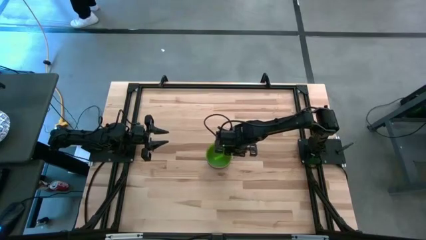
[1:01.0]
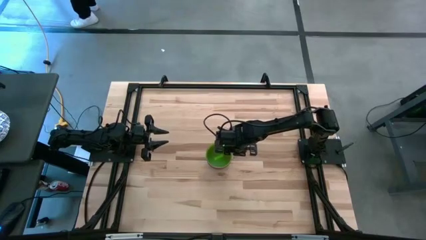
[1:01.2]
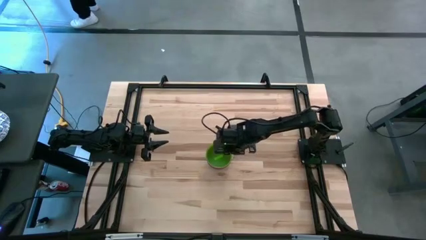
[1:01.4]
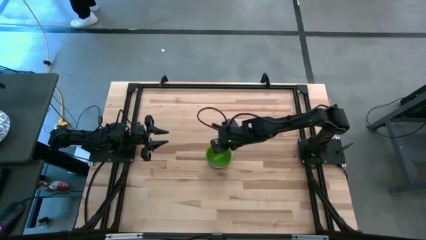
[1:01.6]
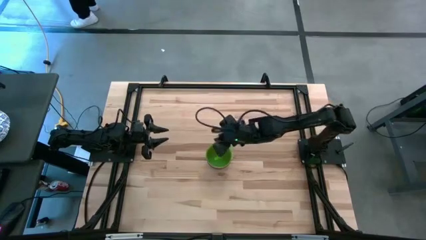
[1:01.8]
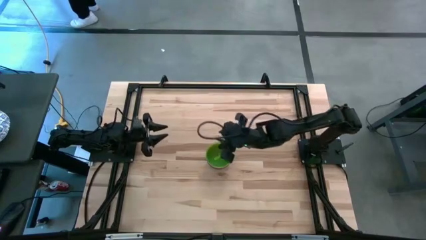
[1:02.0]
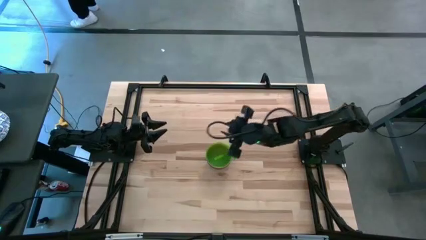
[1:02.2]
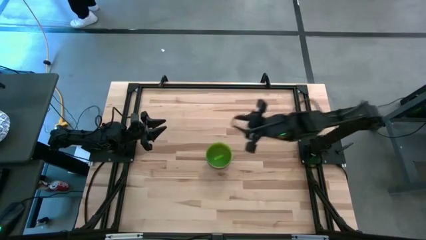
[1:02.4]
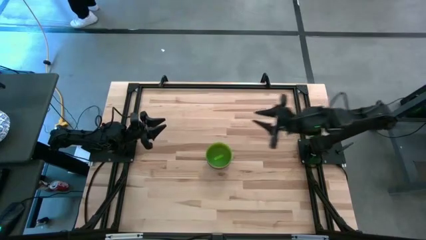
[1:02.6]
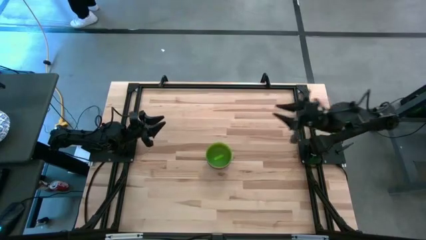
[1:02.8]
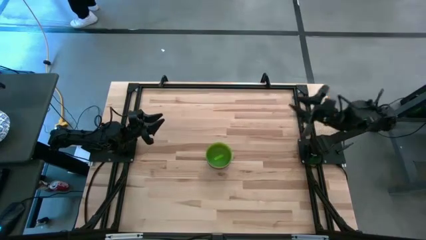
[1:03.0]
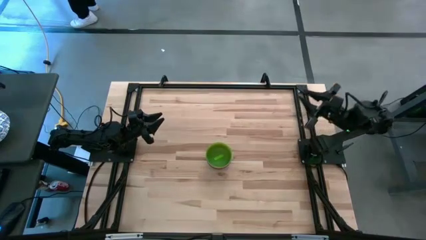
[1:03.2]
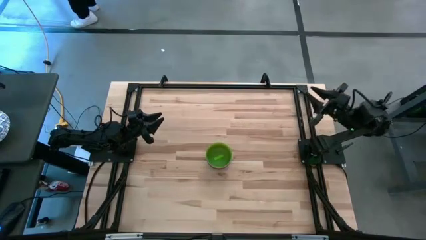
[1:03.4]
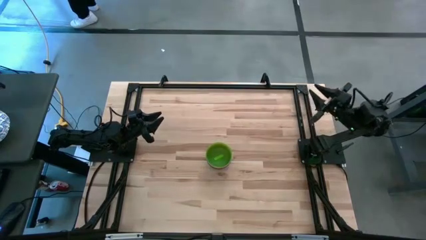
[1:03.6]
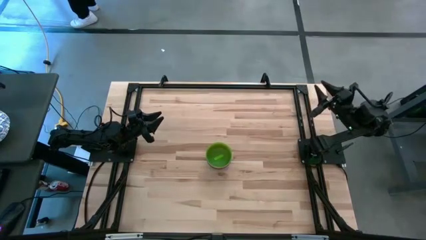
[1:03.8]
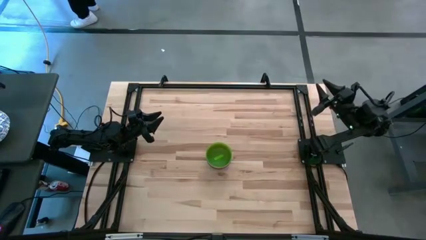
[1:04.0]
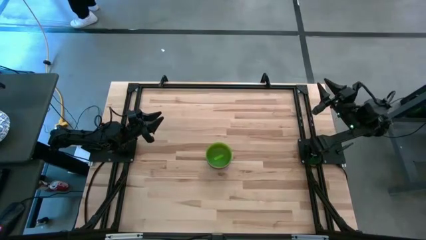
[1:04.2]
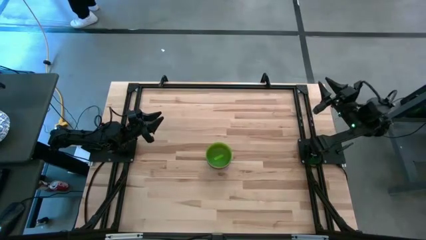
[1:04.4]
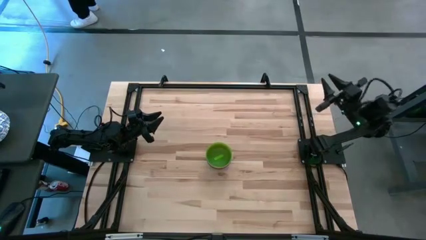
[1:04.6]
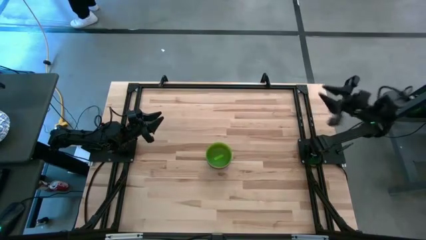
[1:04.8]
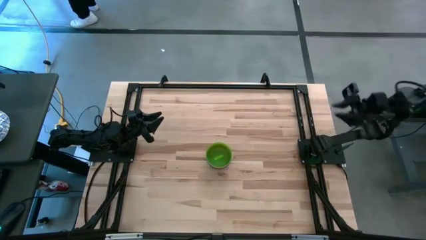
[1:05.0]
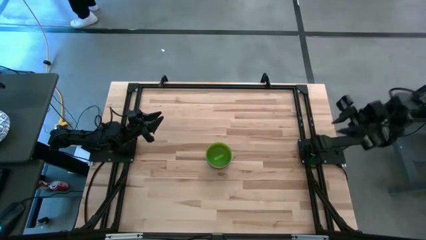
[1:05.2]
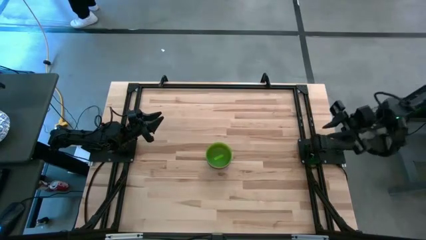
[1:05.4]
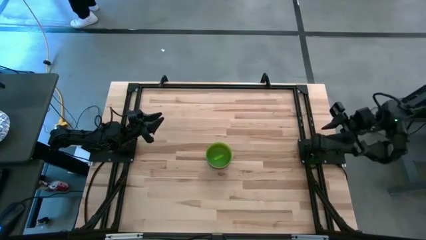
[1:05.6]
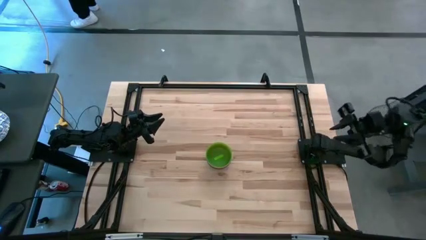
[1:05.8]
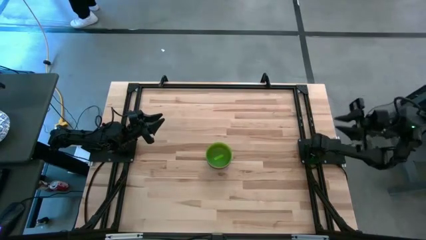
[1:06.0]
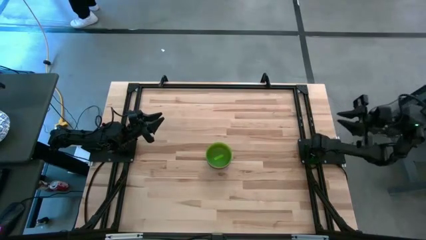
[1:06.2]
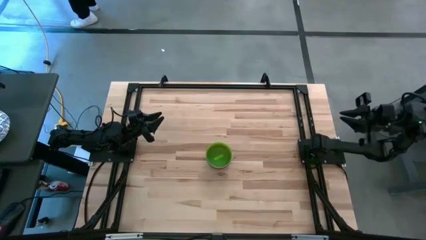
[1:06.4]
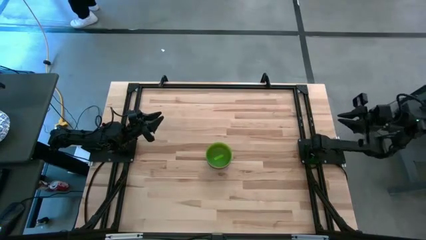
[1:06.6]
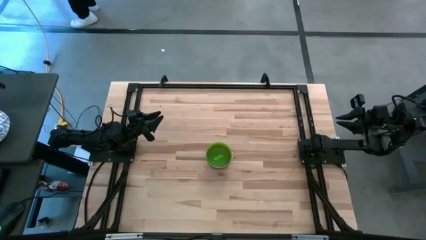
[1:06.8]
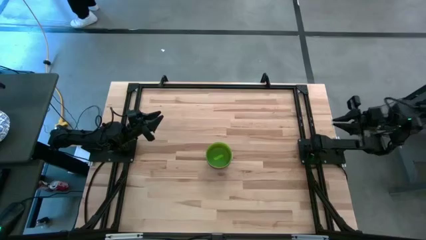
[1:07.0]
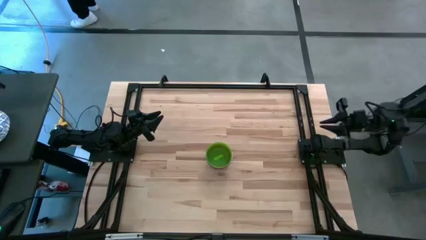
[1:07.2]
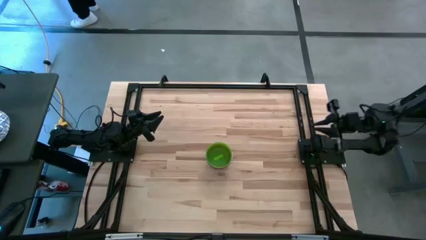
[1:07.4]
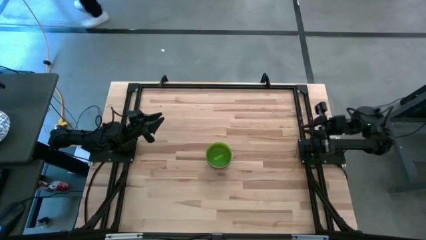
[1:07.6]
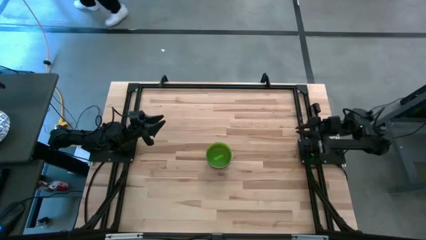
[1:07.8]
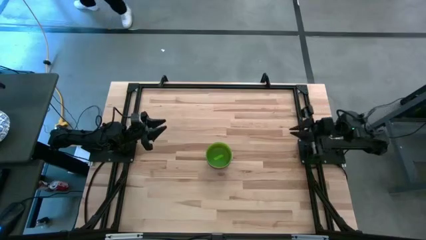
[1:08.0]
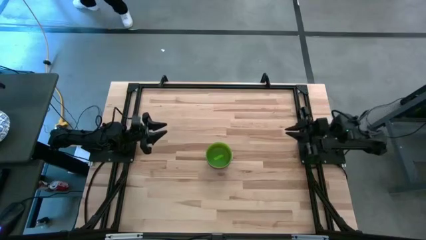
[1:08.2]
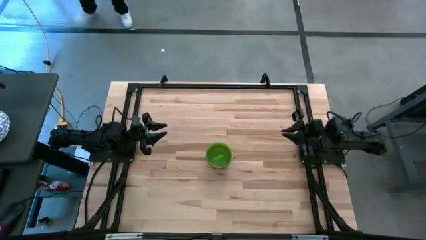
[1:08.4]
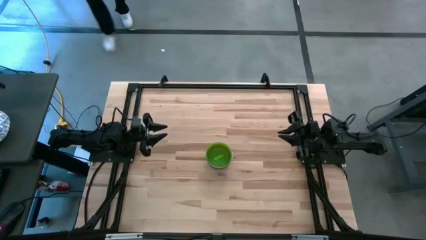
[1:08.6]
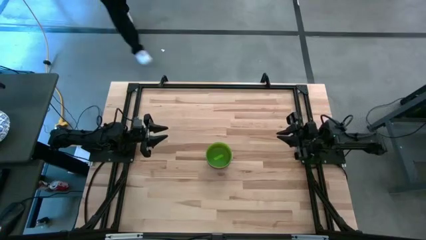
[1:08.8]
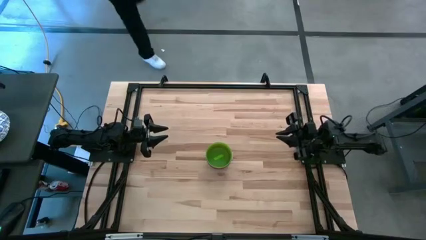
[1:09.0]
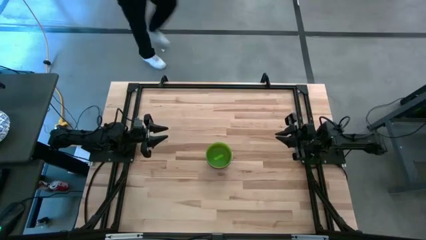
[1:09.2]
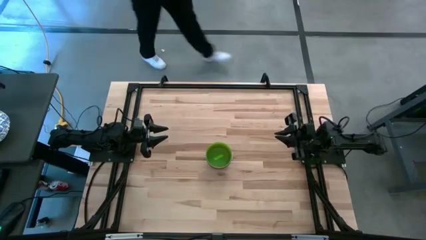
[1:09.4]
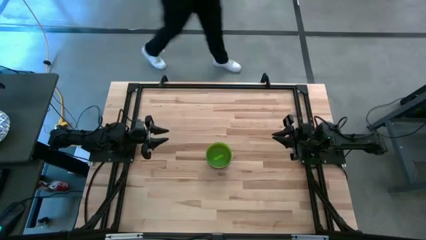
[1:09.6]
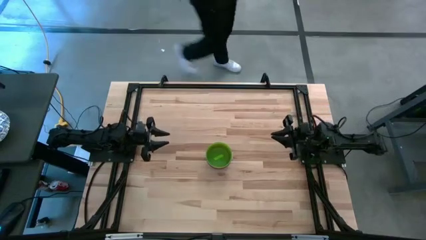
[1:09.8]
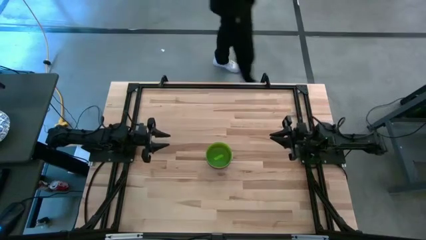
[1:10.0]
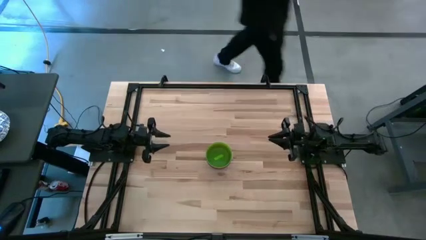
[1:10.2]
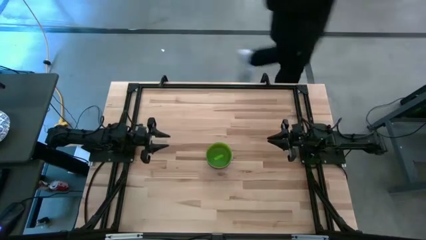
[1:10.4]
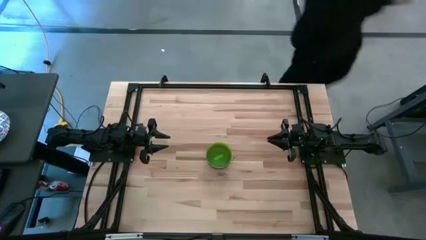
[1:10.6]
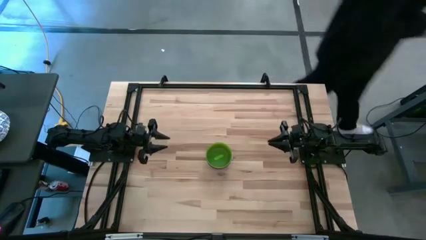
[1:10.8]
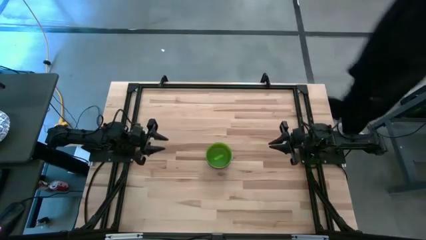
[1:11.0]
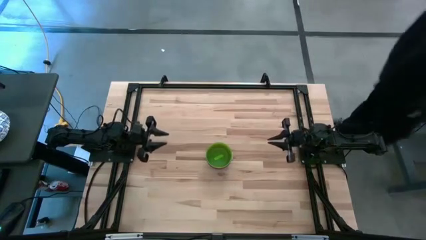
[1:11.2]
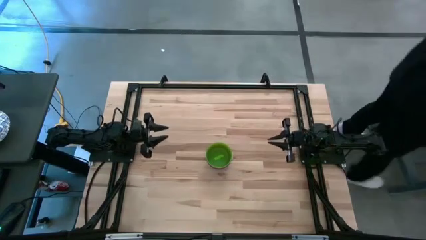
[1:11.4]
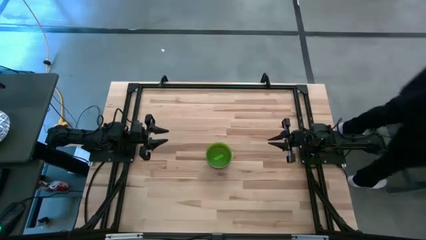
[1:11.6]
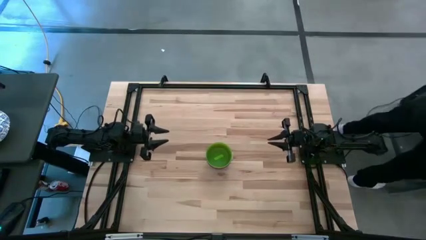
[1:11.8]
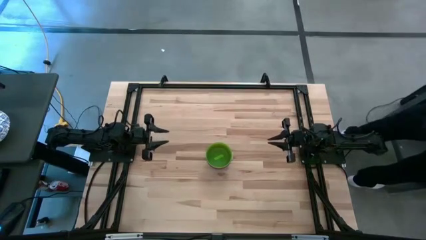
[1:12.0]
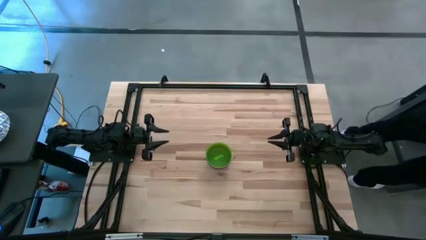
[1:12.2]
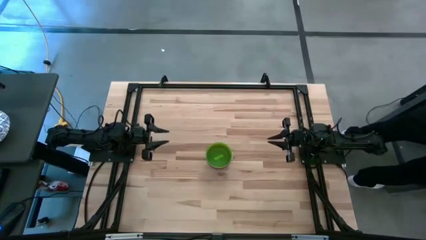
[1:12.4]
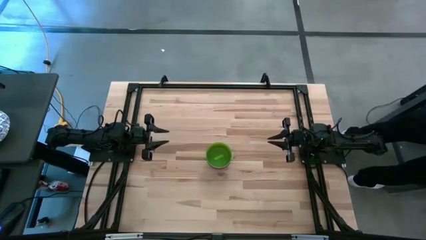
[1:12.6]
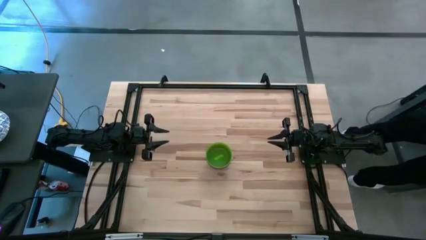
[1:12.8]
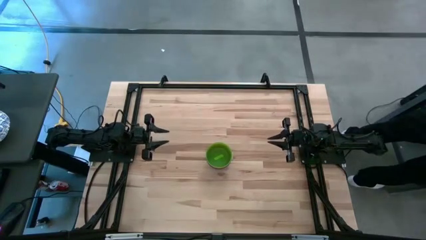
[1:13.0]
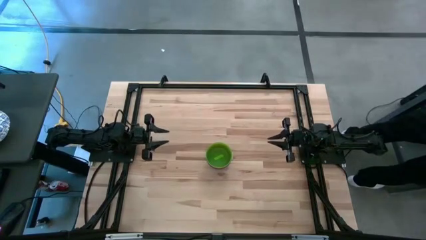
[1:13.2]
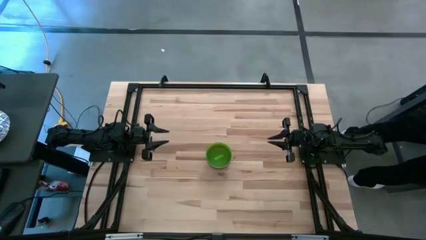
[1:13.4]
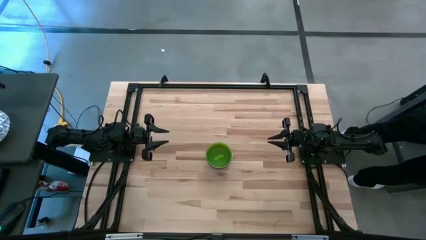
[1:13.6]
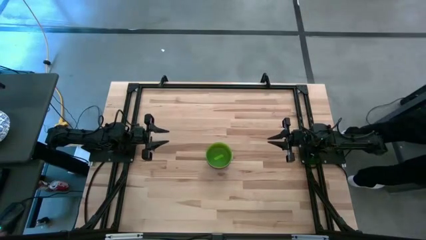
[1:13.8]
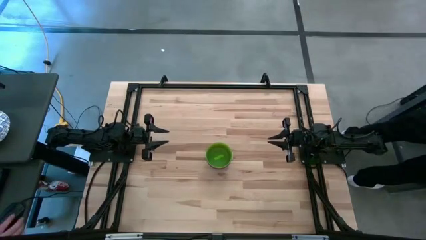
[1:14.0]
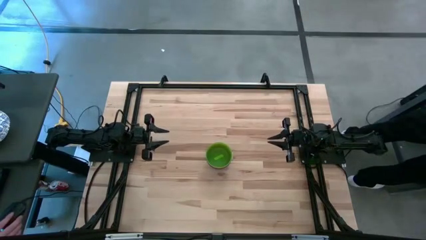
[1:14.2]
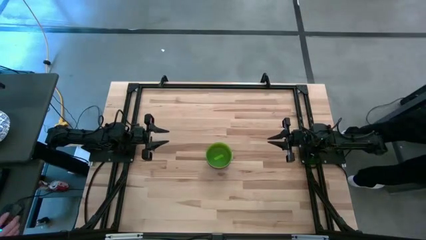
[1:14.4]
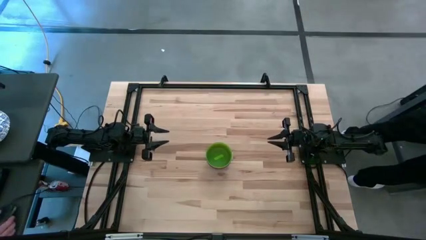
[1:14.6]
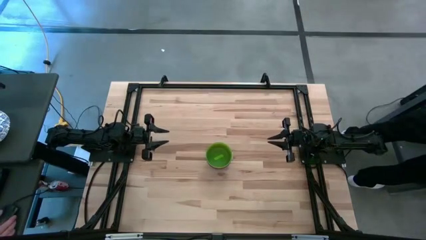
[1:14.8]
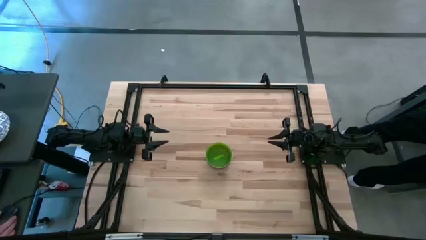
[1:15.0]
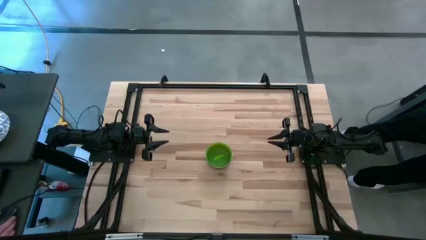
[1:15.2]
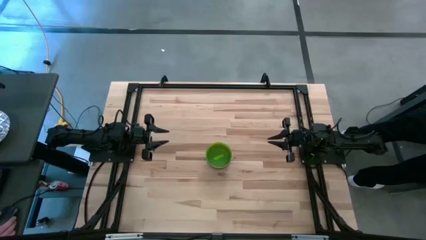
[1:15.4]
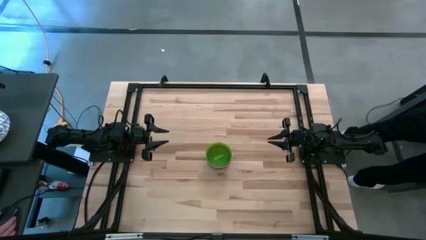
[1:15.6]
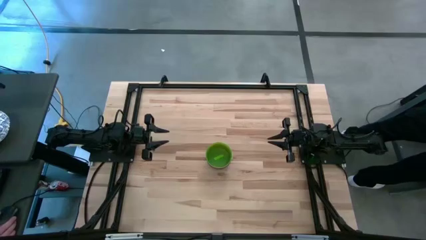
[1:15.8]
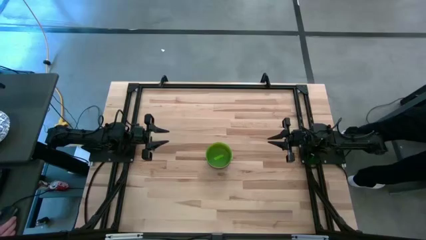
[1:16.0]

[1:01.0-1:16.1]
Task: Nest bowls inside each other
Return to Home Position
